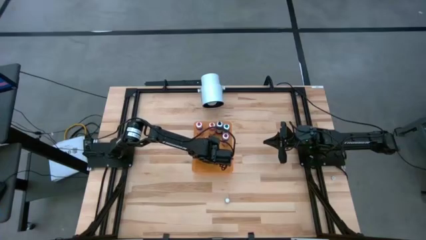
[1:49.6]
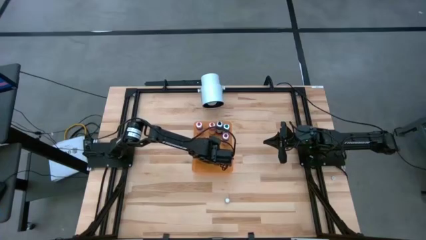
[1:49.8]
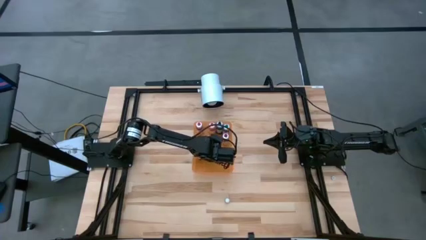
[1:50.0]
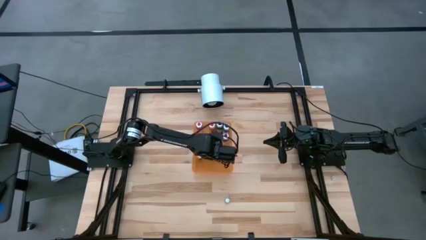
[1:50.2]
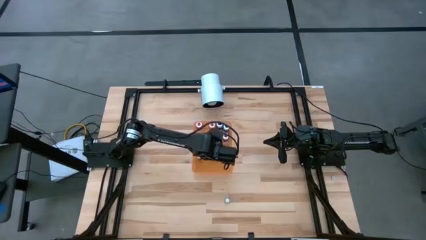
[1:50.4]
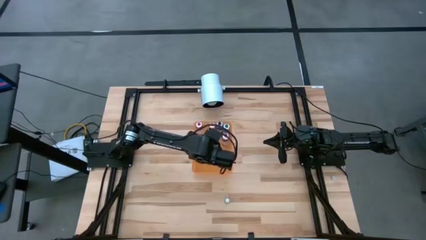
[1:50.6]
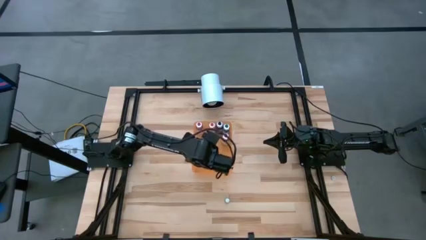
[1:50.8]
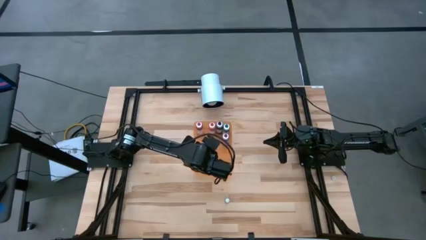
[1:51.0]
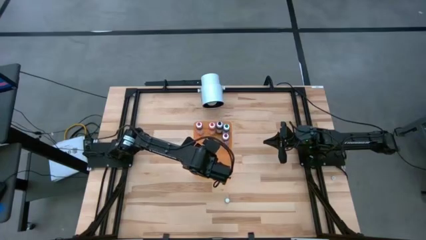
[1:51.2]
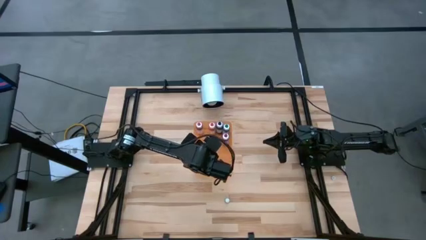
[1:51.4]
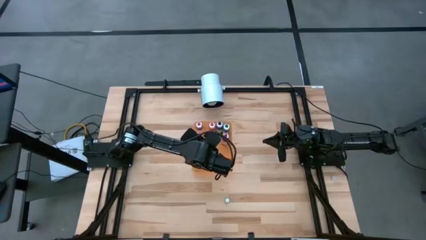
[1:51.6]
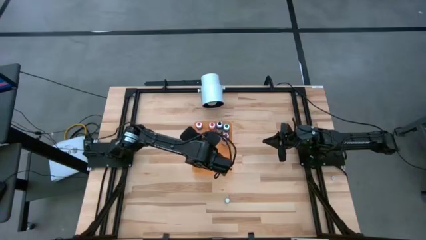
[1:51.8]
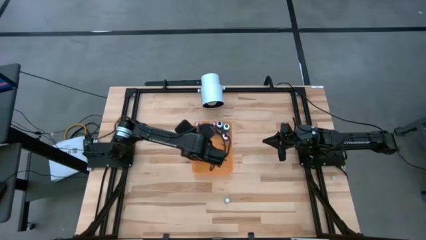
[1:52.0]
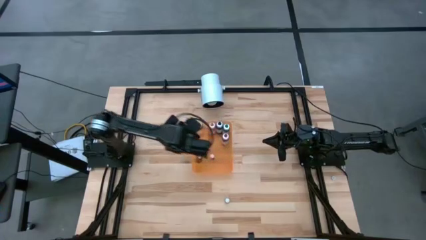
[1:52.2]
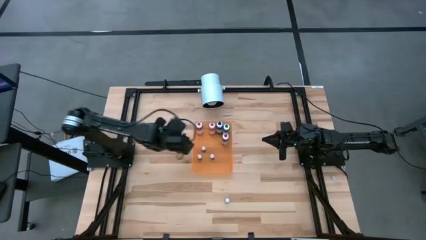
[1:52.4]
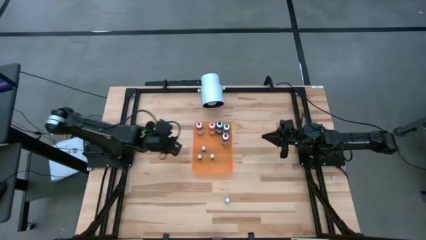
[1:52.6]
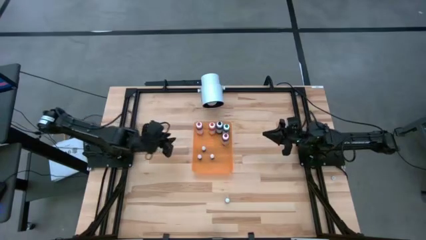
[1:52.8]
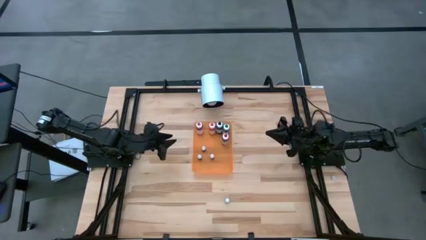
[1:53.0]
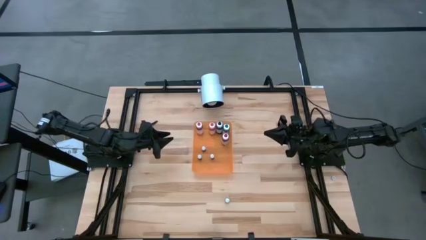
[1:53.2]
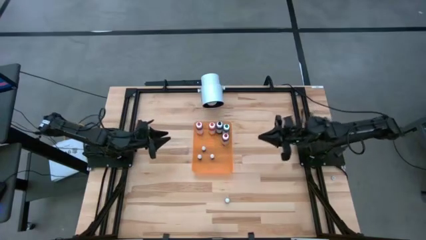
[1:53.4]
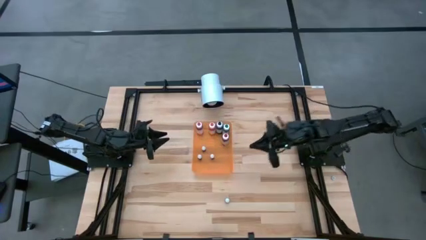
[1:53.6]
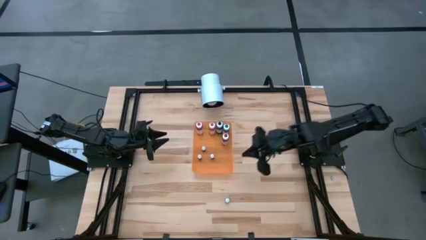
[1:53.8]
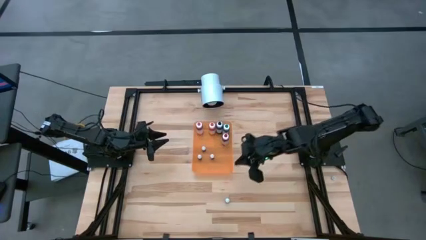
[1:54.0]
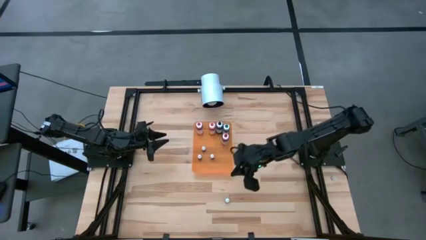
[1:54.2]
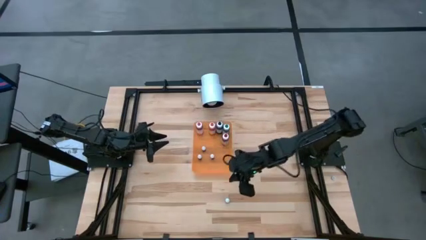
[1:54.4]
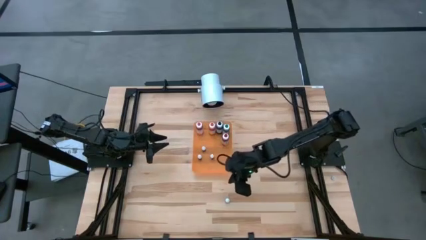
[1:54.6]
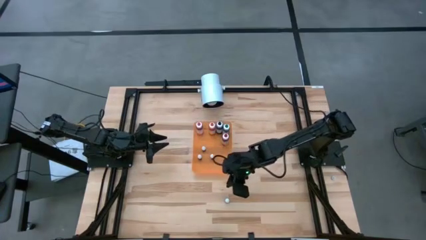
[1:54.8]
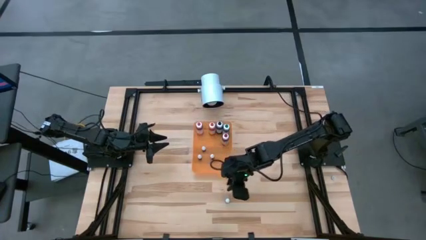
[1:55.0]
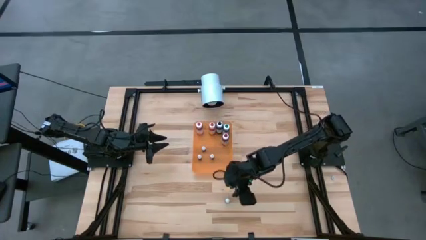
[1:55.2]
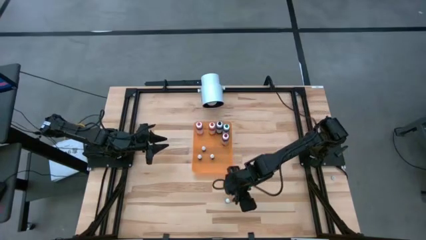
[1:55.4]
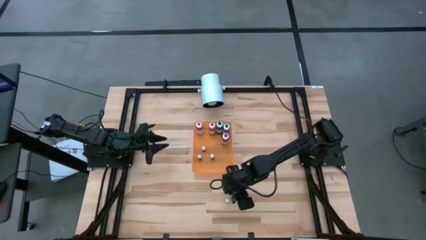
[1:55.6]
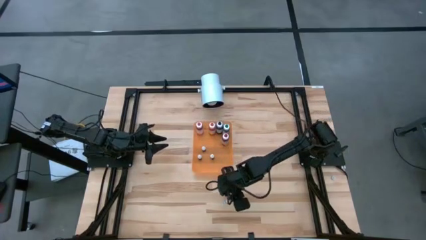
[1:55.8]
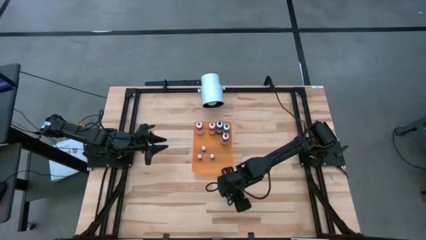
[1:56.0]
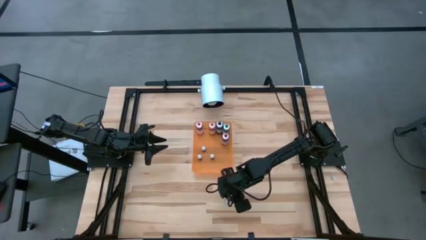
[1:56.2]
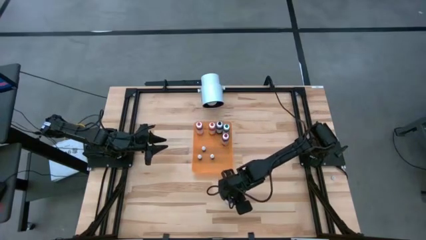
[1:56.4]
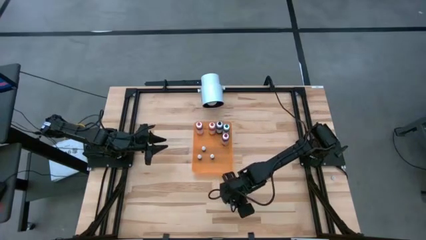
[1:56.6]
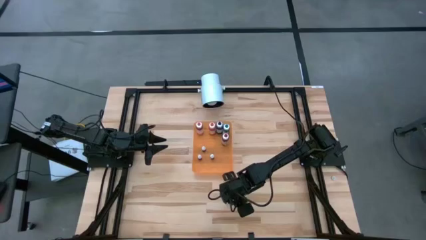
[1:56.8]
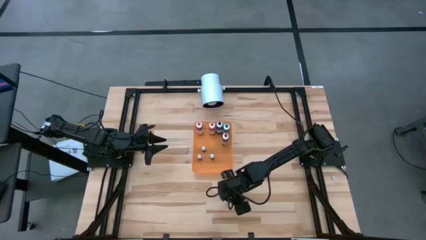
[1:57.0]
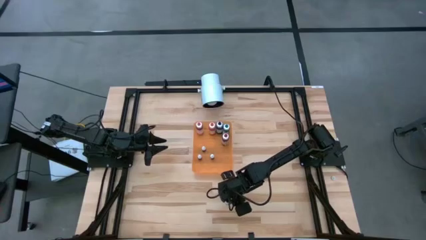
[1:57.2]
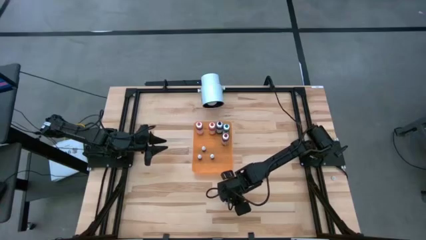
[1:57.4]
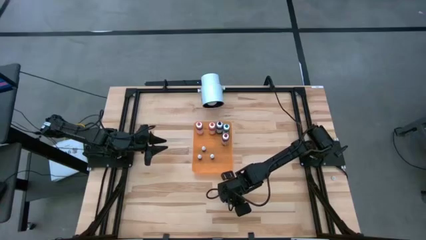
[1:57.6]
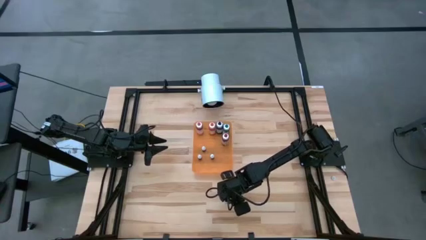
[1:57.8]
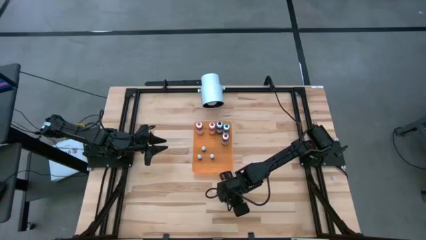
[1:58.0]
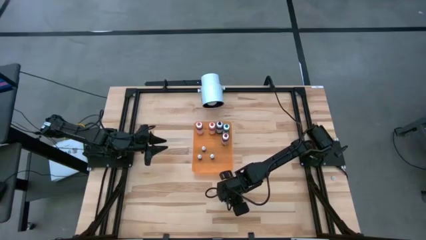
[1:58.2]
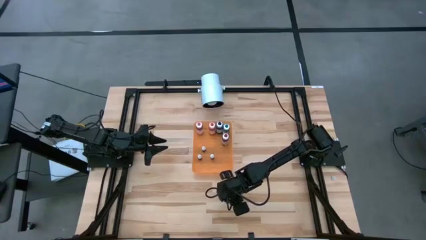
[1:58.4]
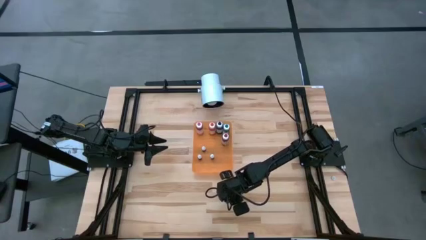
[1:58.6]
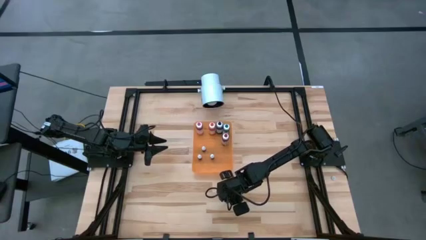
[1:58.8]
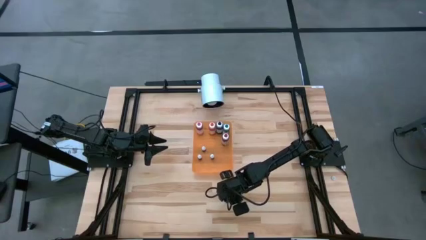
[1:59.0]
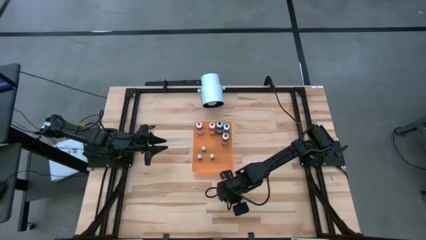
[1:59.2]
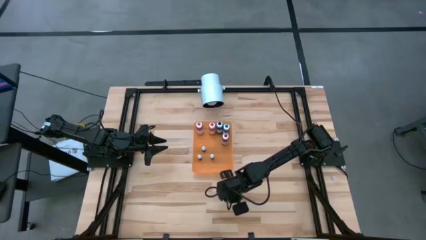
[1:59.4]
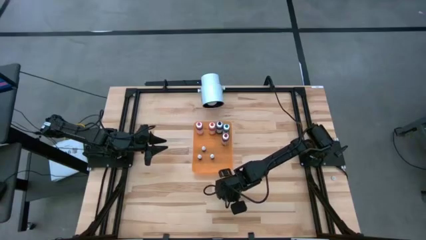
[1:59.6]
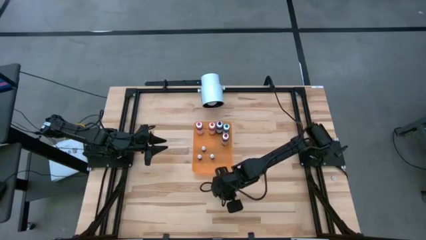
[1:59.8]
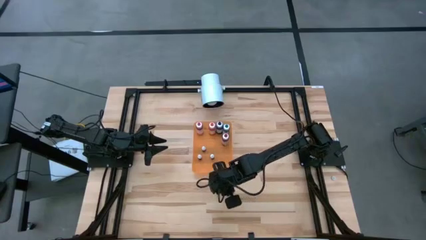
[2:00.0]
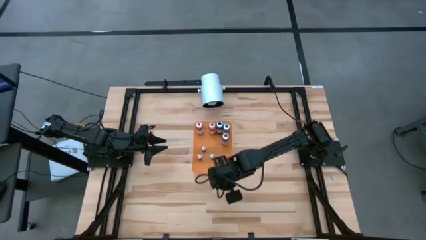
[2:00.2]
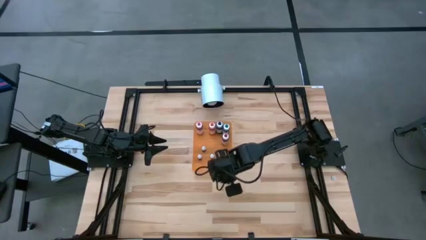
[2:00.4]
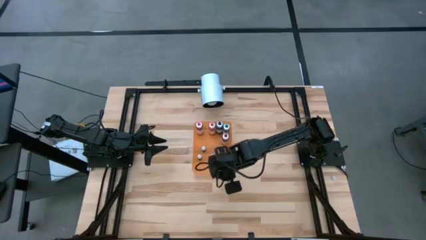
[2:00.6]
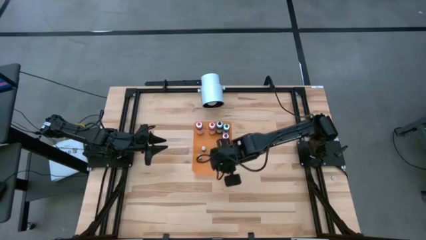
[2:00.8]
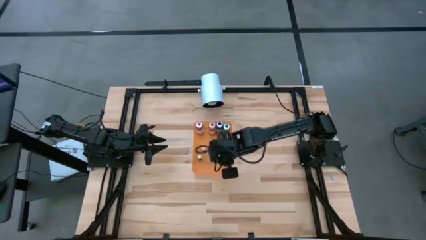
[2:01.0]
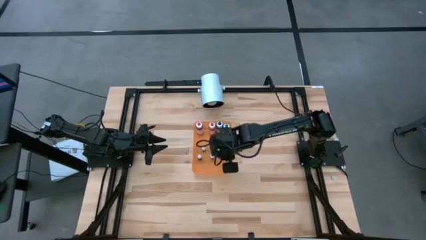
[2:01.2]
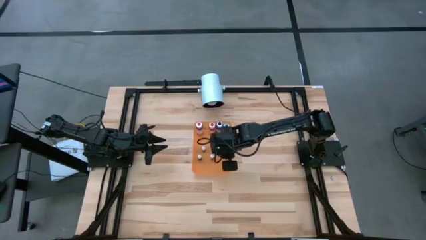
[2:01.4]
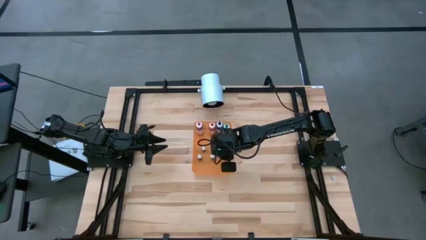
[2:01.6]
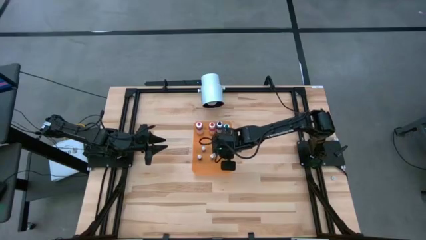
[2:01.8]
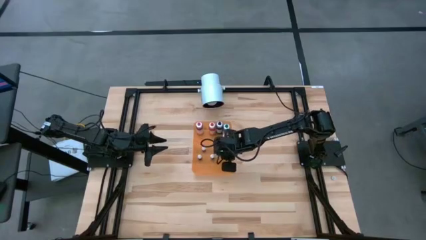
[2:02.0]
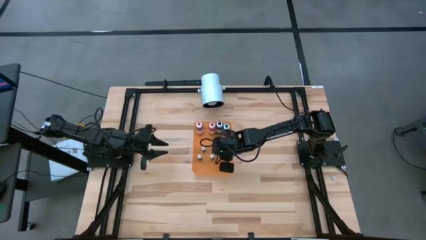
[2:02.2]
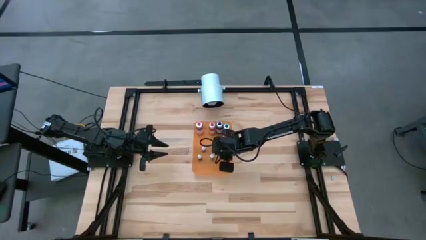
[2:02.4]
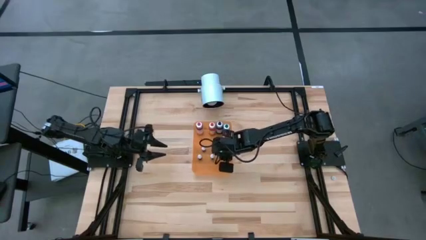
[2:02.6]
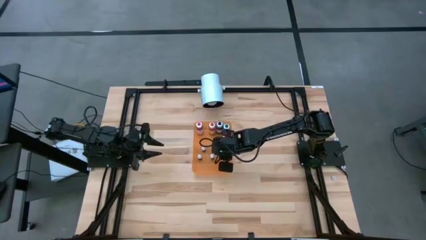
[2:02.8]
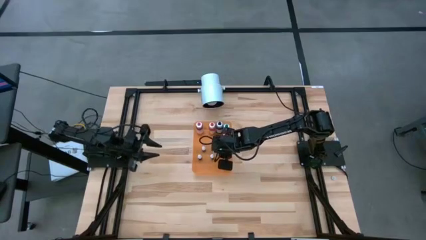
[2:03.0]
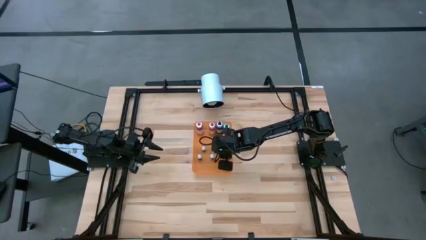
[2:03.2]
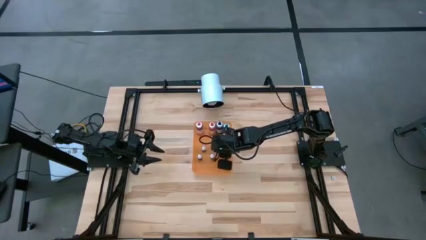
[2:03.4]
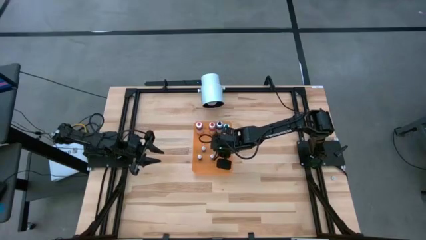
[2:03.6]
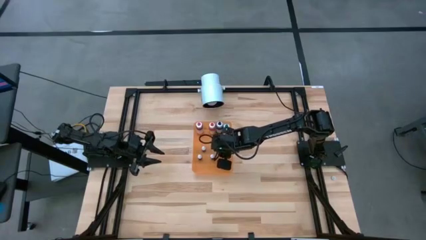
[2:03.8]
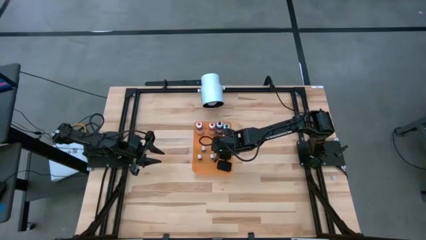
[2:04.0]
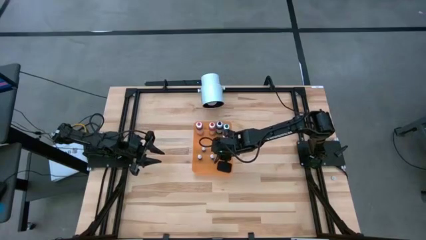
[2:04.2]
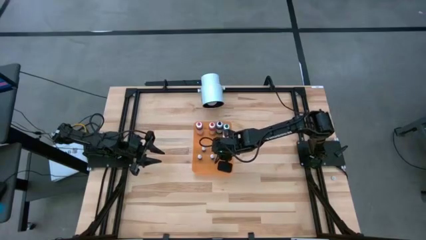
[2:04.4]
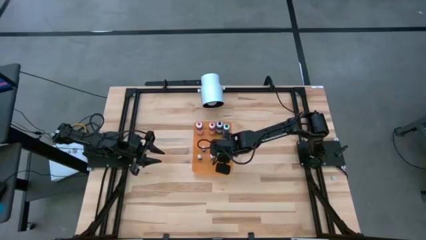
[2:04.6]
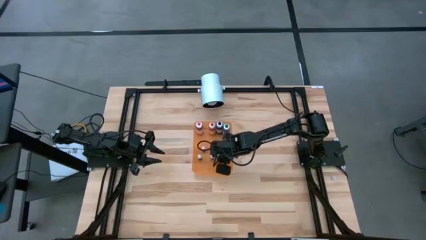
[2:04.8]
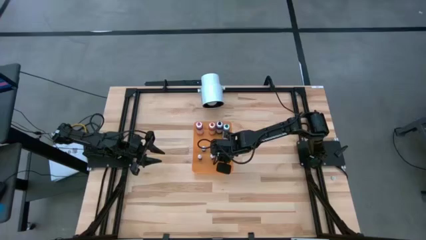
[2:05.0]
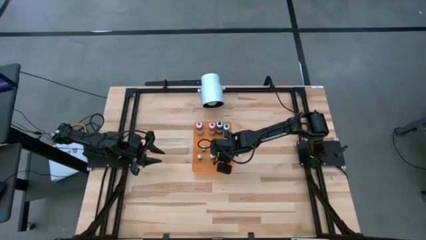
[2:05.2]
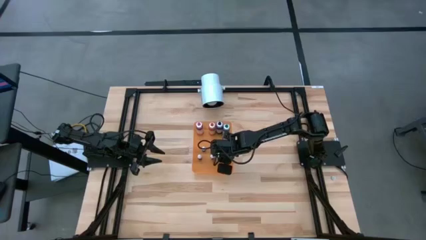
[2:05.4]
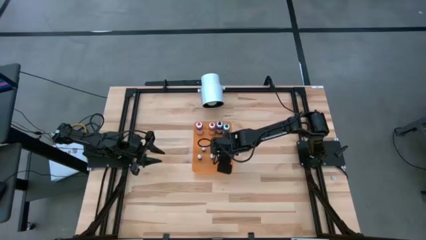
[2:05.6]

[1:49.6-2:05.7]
Task: Pick & Place food coloring
Put the small dark green food coloring bottle into the bin
